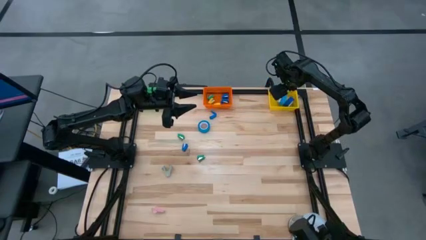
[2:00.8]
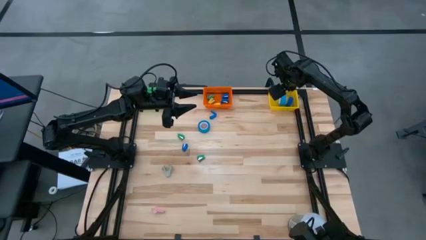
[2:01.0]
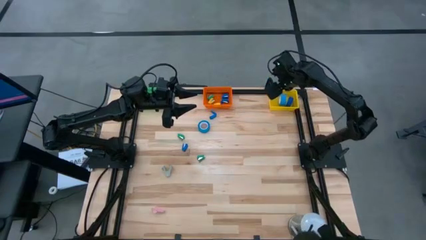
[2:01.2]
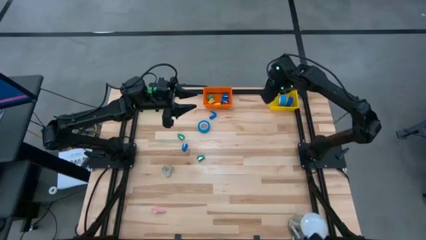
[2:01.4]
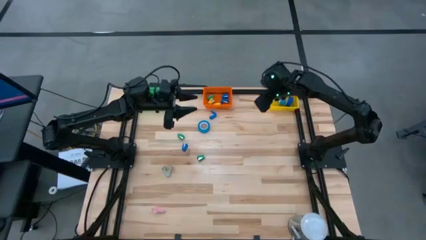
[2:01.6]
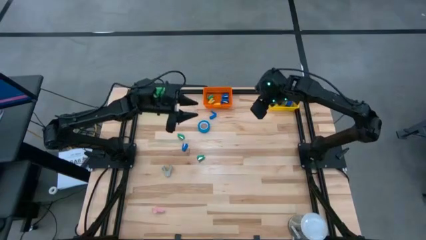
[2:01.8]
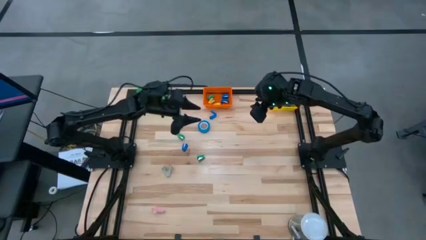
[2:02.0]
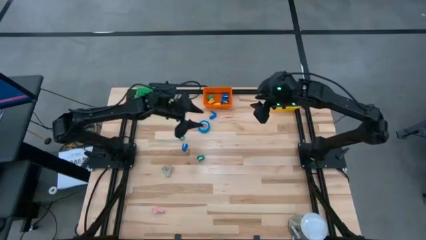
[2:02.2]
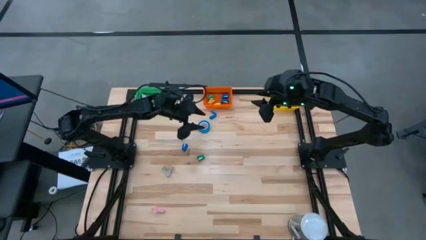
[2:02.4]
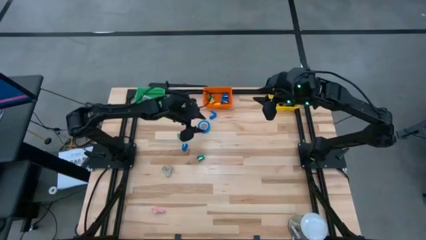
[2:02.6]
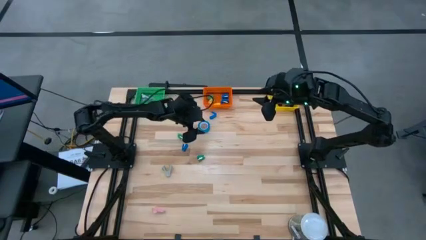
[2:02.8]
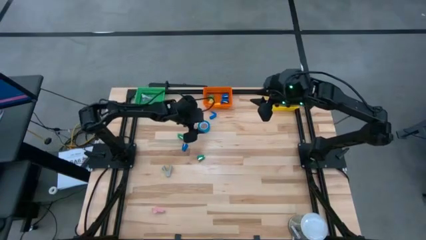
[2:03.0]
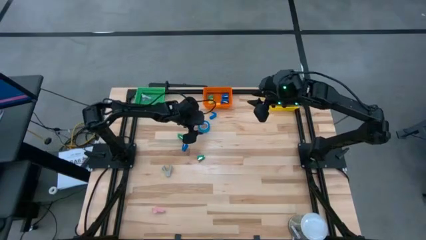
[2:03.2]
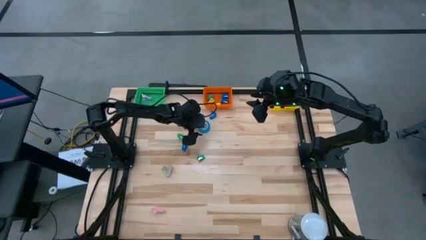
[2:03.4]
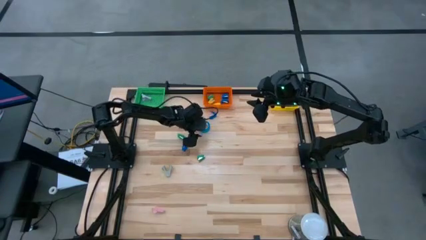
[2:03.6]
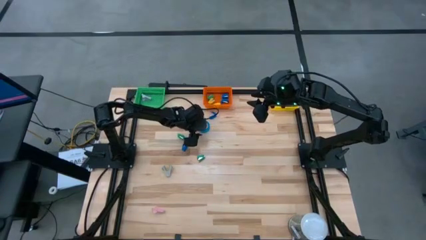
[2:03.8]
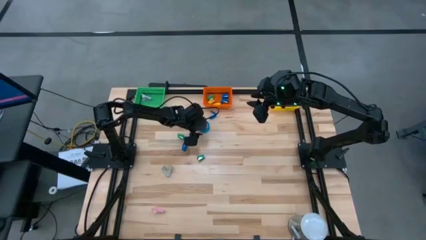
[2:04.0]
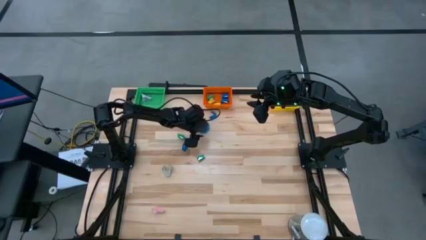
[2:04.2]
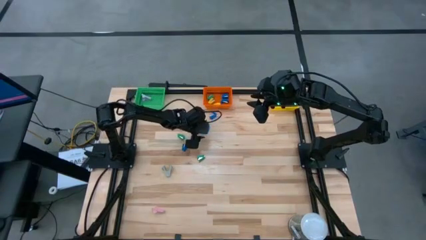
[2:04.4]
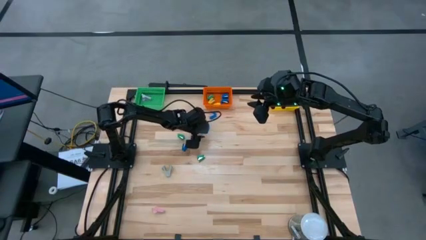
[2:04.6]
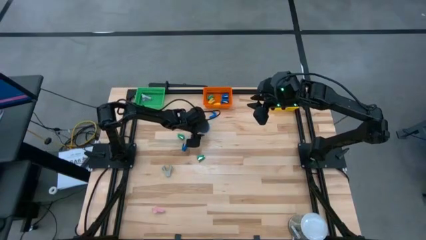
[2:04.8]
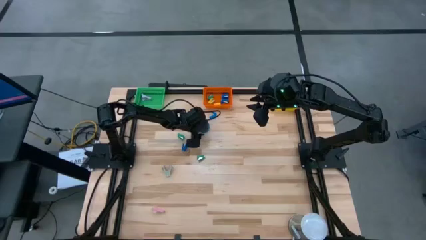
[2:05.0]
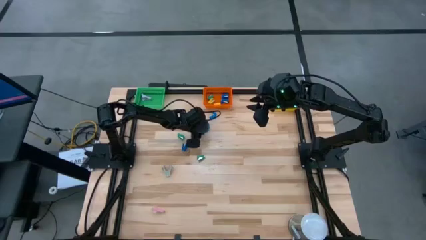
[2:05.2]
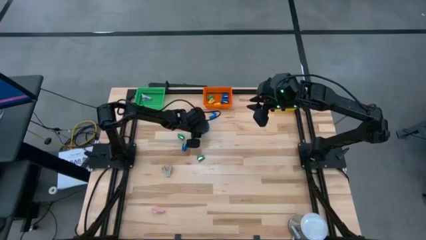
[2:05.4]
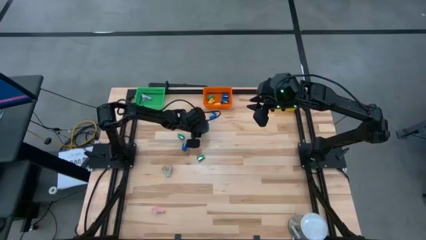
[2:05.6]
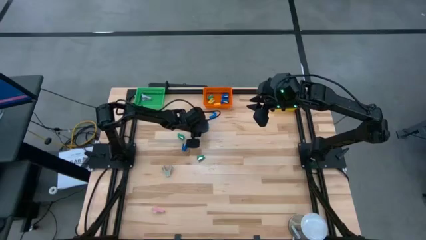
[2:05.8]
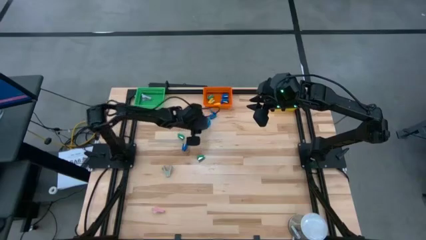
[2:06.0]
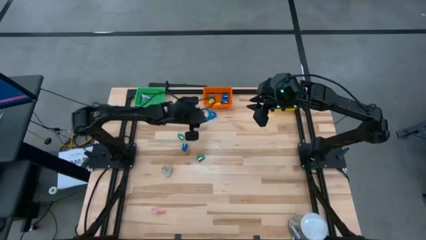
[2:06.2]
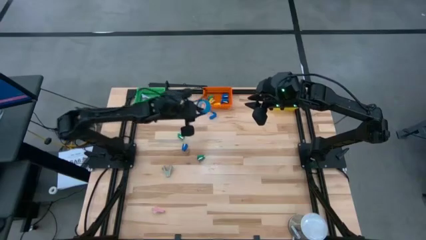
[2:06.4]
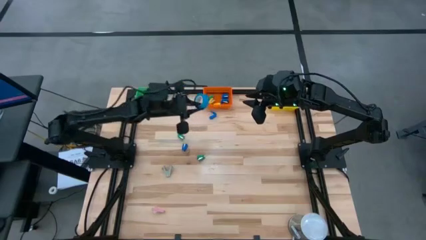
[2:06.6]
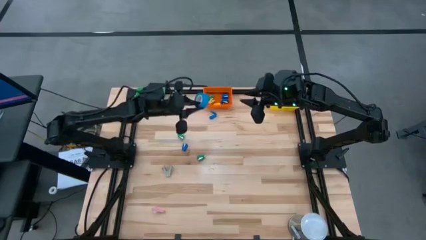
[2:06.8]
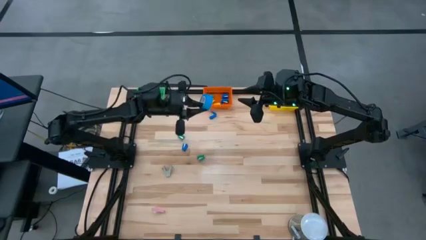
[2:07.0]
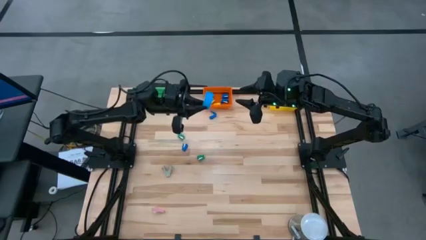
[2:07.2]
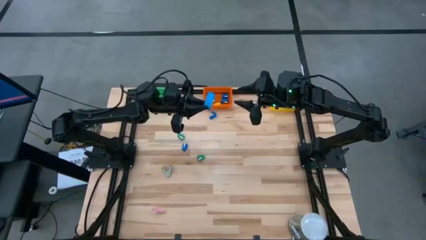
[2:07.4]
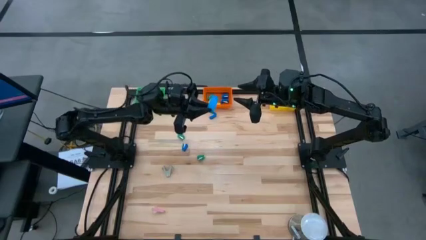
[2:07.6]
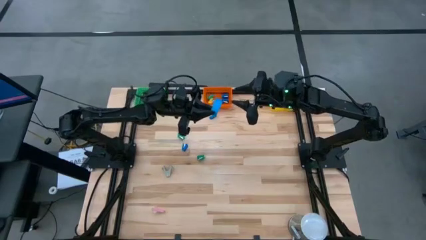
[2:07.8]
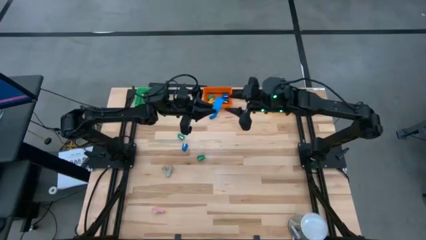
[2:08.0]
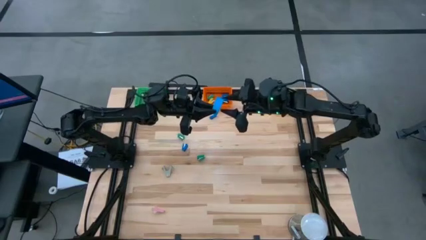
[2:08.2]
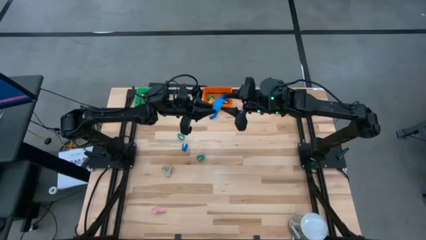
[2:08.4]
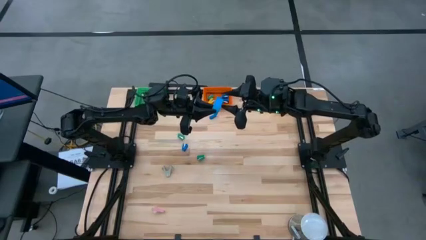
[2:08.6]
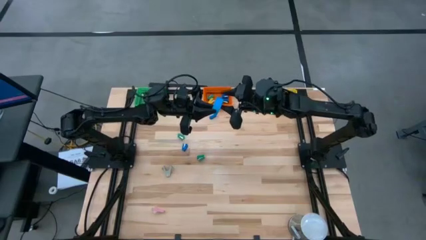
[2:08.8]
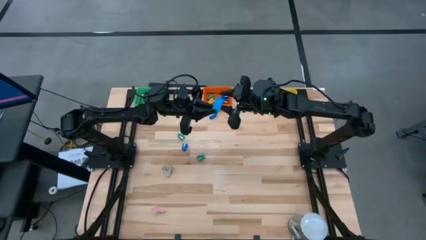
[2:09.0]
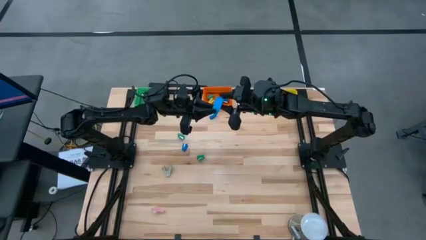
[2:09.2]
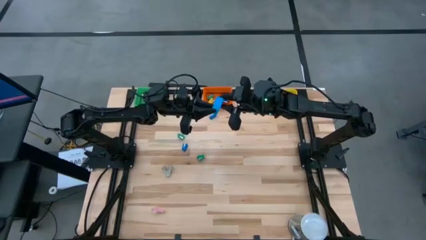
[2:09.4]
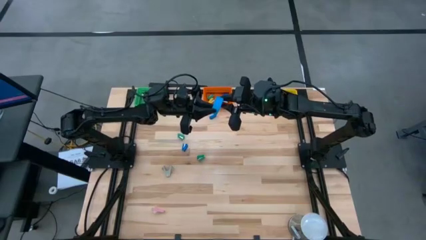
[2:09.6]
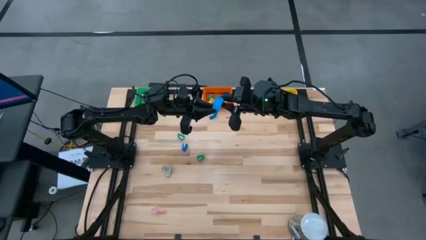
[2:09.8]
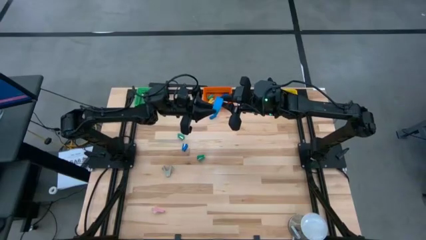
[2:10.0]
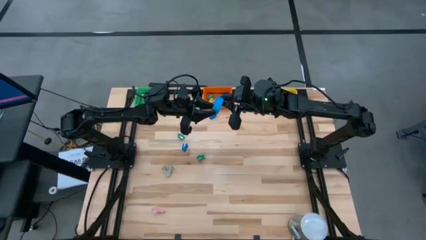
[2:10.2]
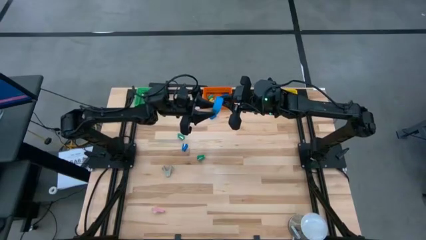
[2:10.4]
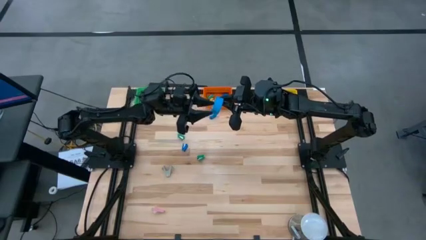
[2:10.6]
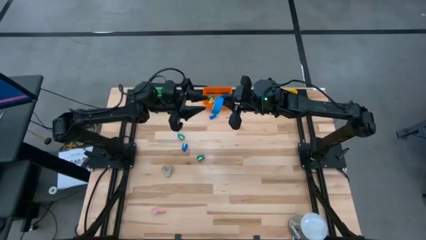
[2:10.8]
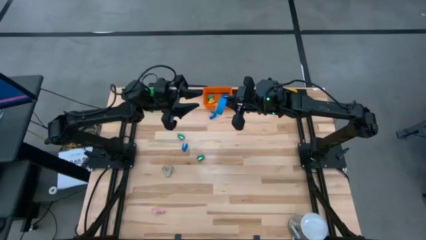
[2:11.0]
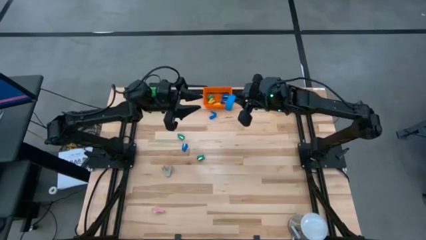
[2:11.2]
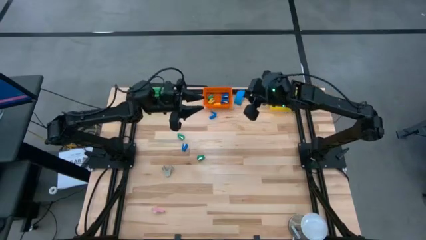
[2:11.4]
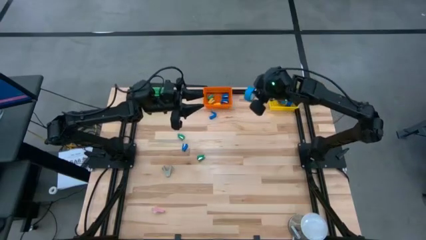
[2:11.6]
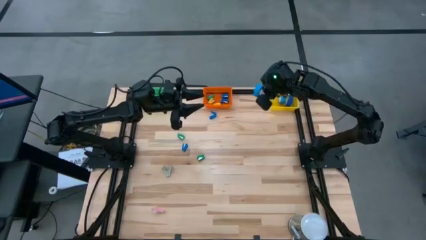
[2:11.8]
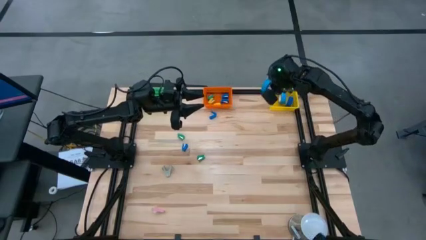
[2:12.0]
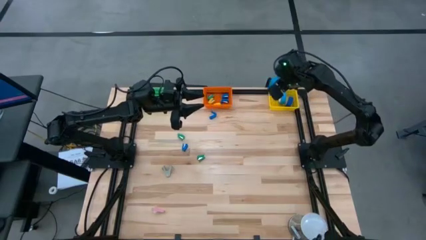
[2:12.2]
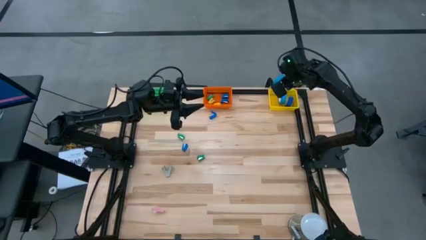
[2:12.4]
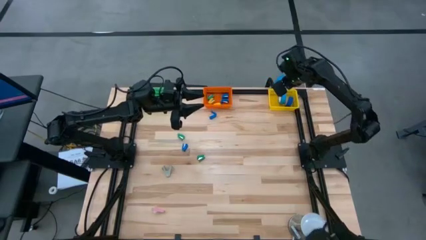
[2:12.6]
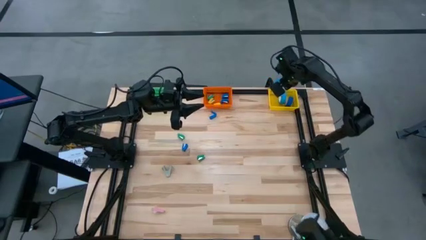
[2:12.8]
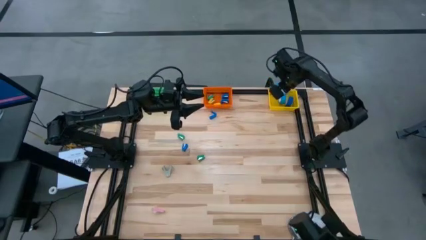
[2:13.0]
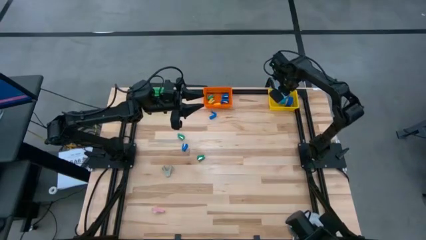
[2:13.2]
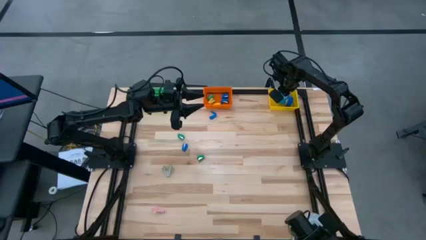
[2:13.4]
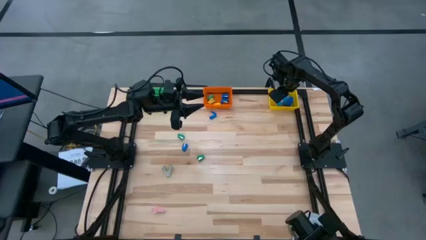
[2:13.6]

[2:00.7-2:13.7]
Task: Pick and place Stapler, Stapler remover, tape
Put the light blue tape into the yellow bin

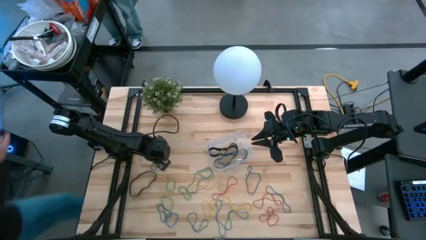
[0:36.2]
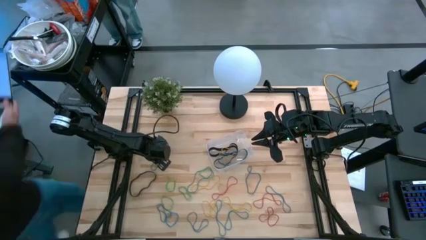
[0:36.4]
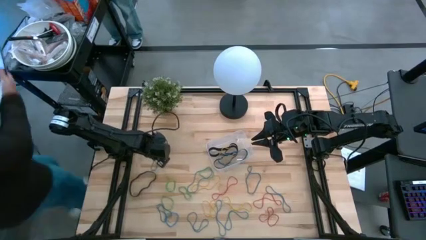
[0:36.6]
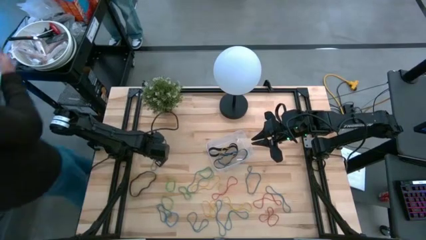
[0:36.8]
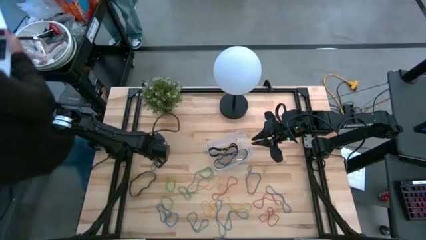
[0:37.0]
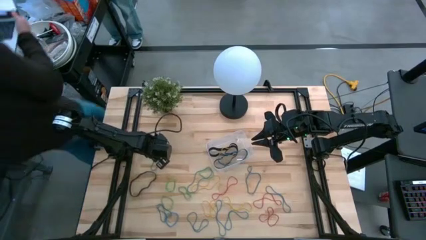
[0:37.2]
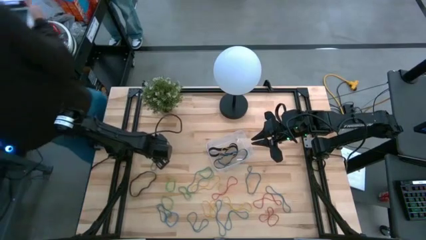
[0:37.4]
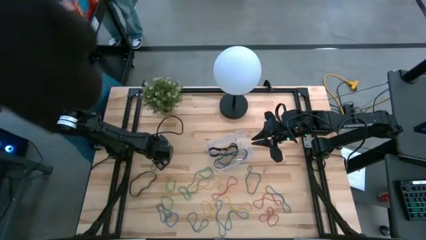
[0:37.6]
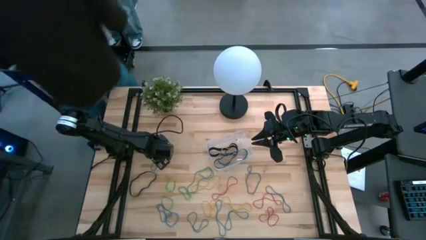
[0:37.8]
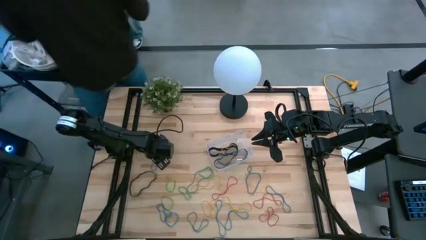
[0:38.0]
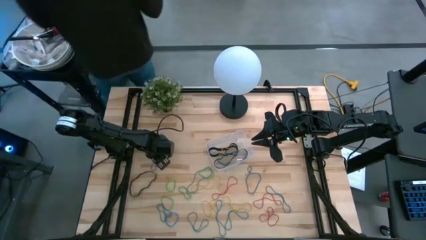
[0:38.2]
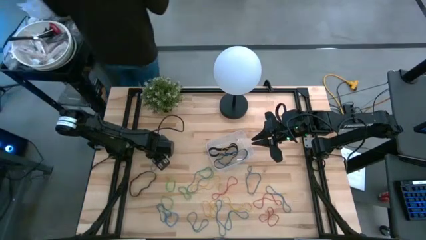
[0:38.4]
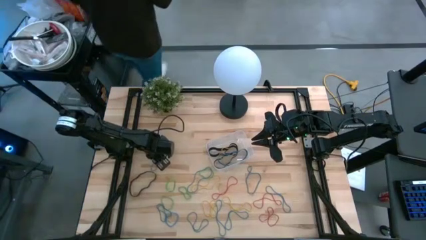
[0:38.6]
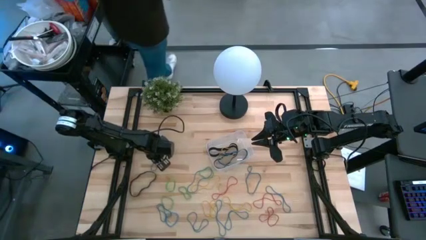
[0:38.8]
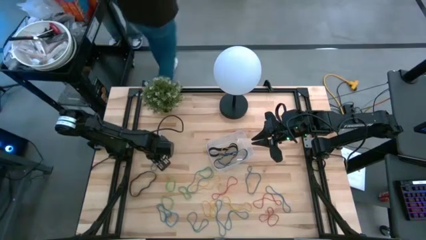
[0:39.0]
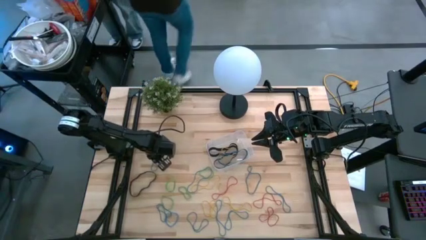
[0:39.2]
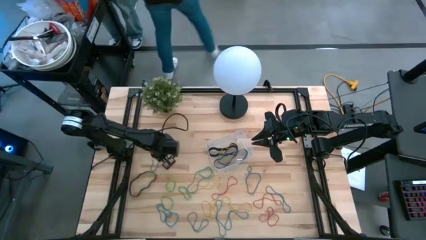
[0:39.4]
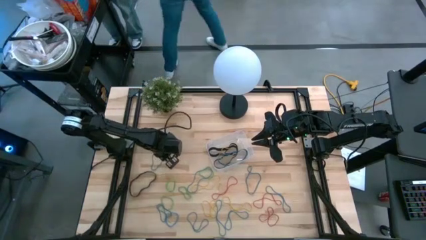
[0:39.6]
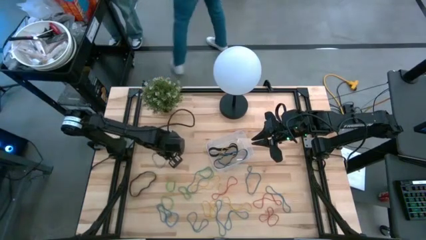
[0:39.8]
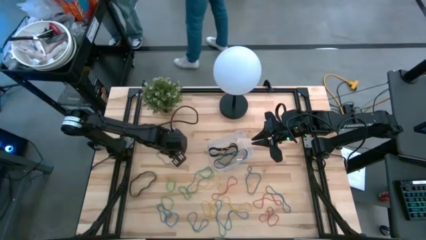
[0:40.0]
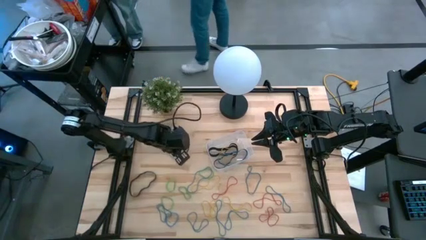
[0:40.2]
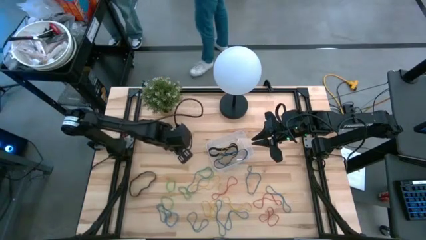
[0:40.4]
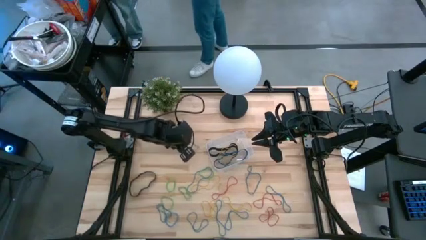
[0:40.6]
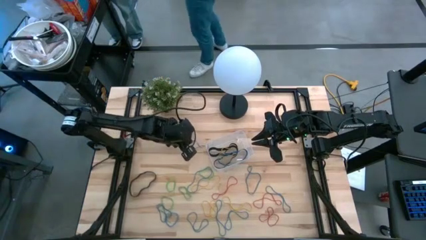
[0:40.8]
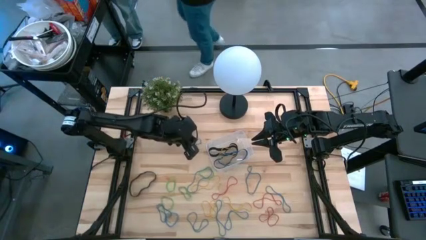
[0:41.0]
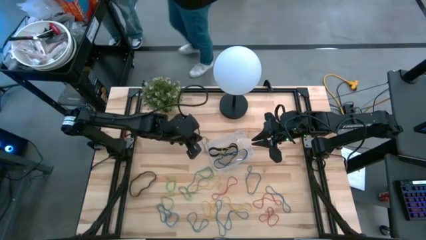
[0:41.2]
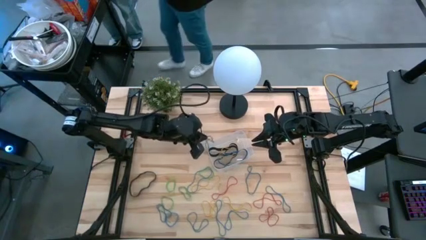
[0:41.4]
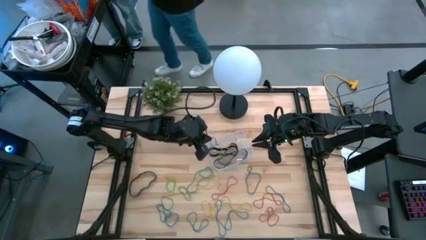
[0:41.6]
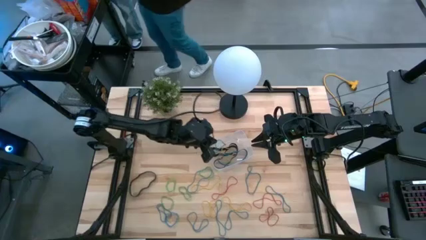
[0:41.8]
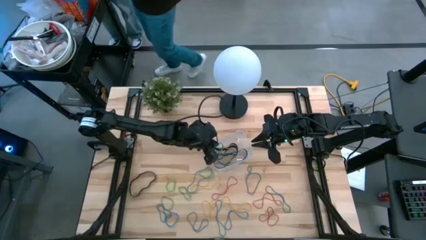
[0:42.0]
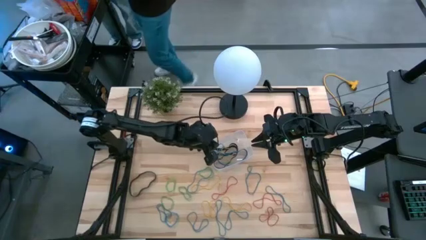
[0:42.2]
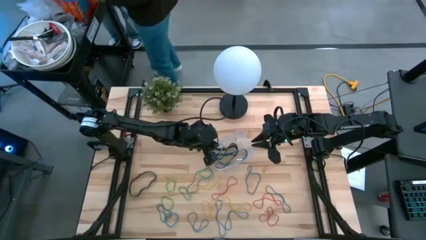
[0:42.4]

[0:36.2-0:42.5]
Task: Pick and place rubber bands into bin
Put the blue rubber band into the transparent bin
